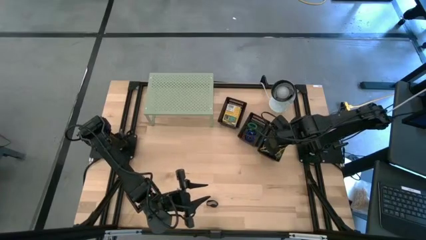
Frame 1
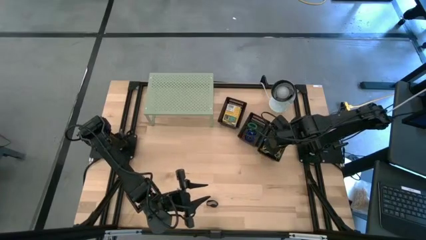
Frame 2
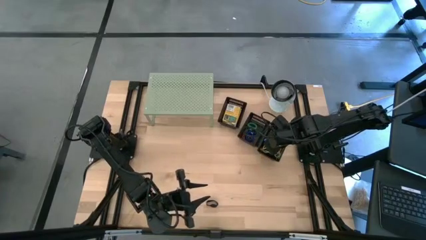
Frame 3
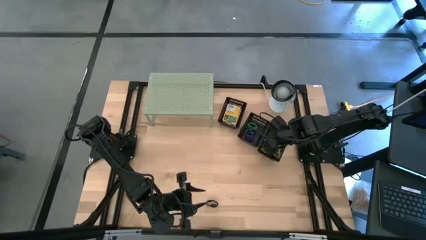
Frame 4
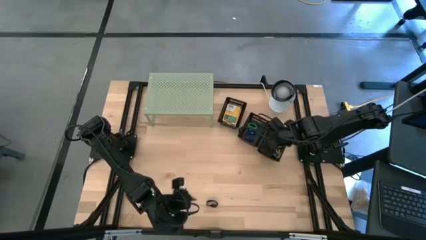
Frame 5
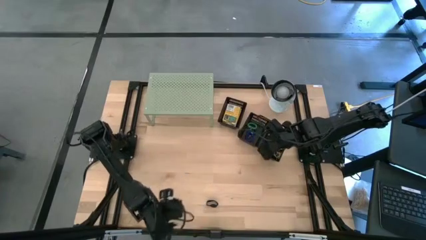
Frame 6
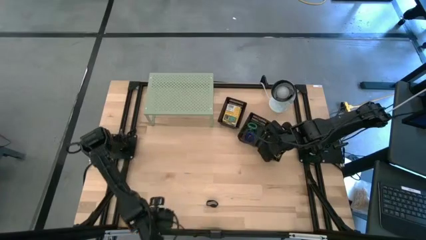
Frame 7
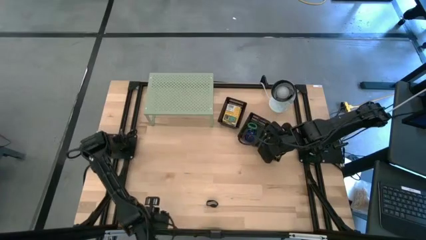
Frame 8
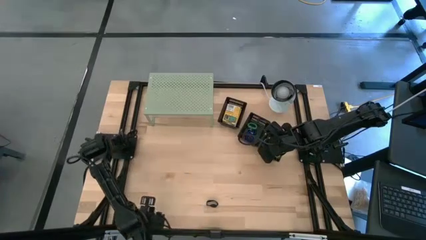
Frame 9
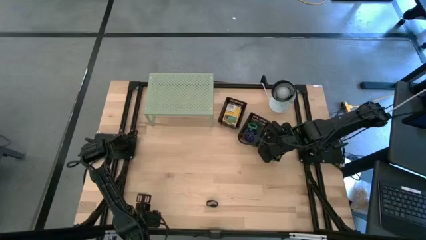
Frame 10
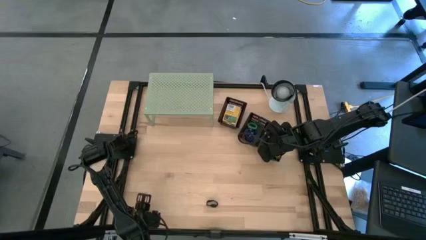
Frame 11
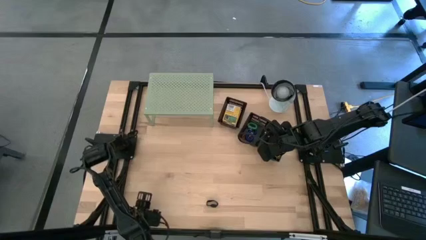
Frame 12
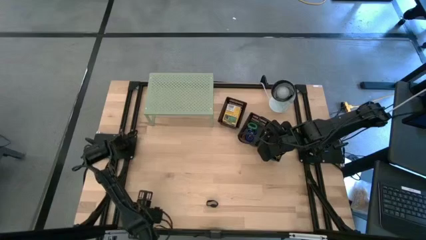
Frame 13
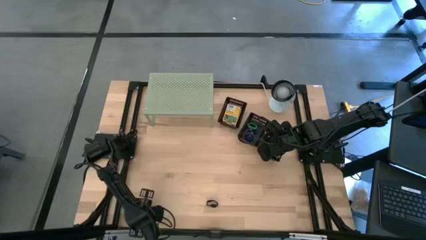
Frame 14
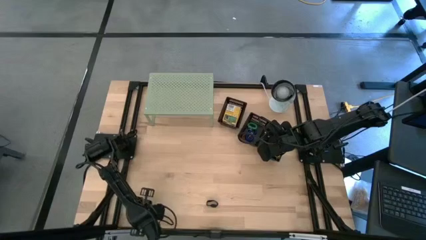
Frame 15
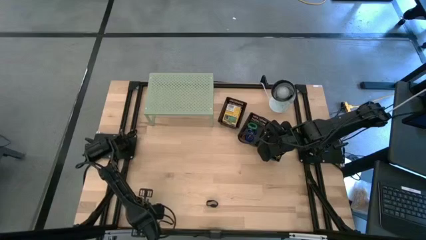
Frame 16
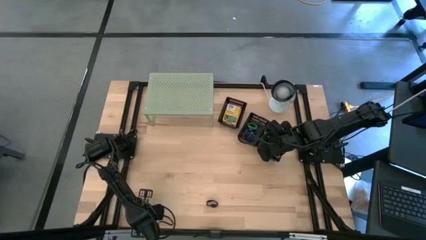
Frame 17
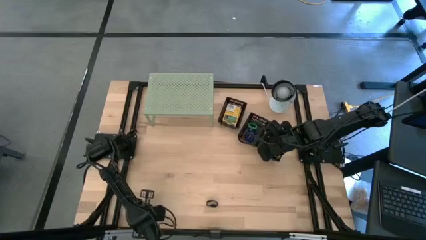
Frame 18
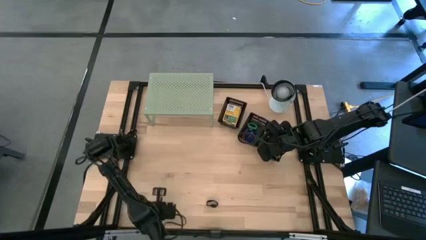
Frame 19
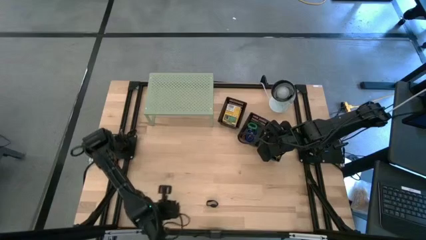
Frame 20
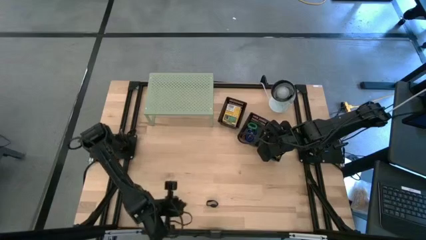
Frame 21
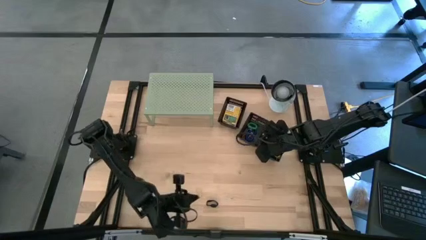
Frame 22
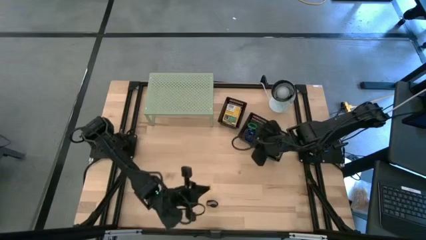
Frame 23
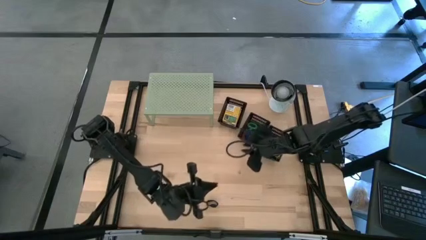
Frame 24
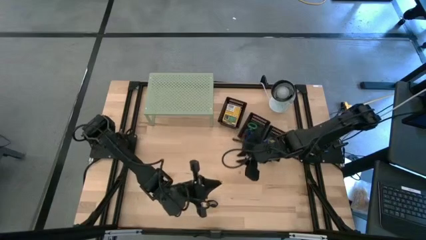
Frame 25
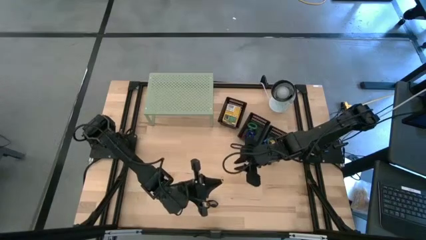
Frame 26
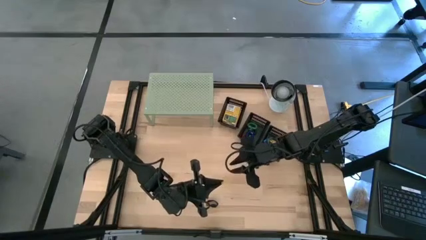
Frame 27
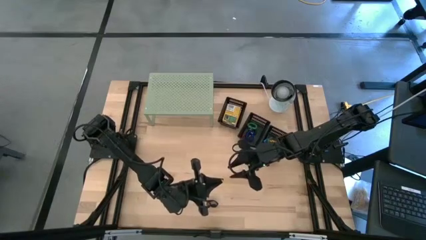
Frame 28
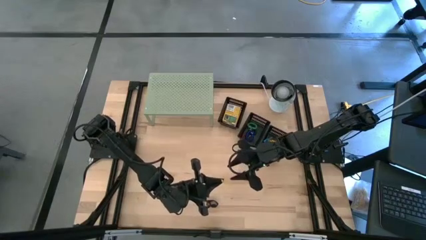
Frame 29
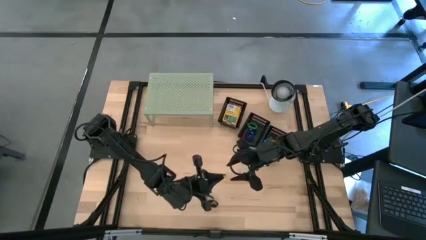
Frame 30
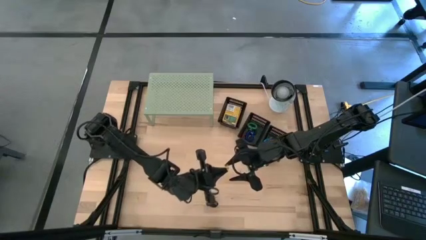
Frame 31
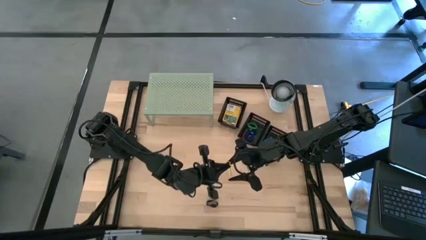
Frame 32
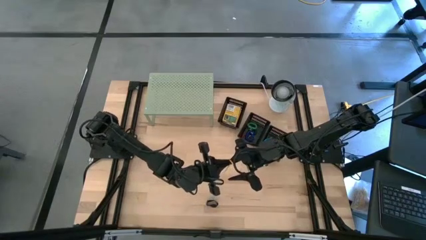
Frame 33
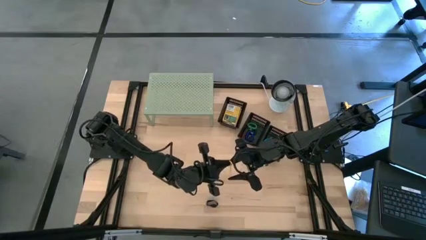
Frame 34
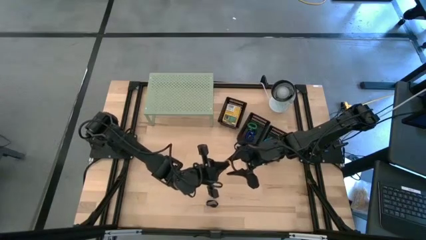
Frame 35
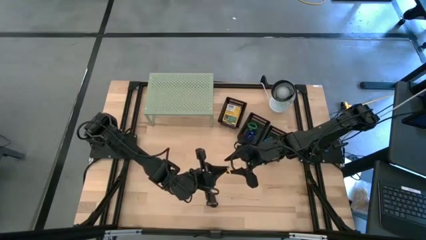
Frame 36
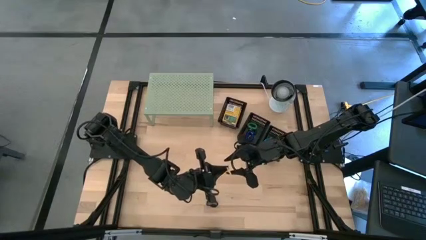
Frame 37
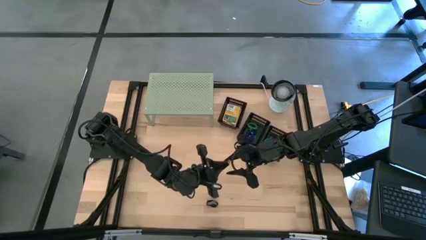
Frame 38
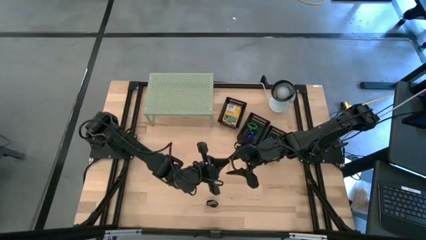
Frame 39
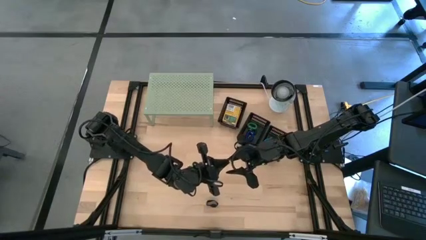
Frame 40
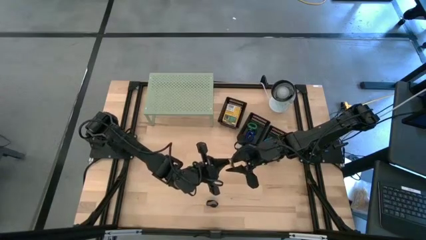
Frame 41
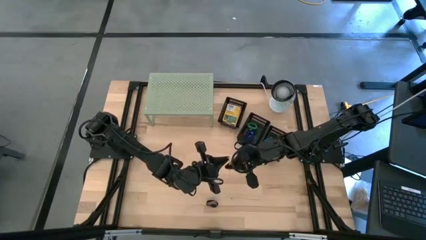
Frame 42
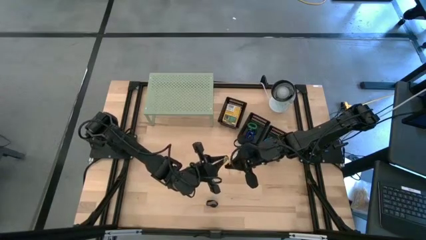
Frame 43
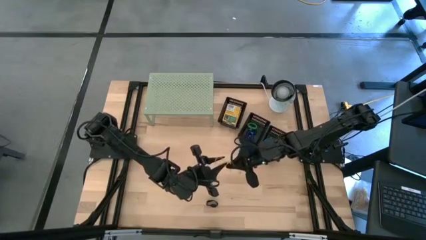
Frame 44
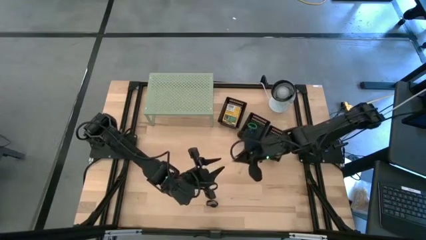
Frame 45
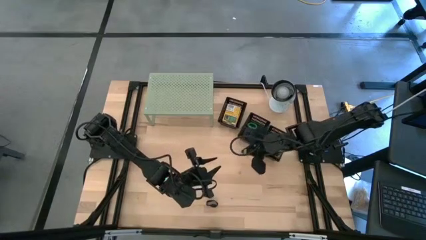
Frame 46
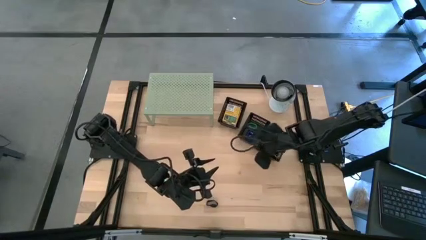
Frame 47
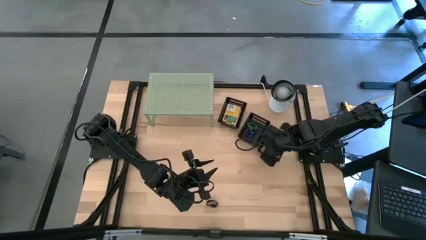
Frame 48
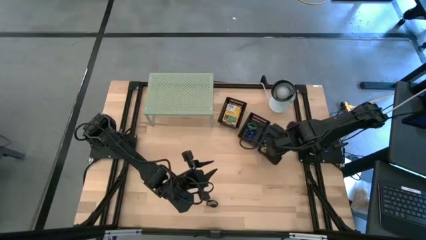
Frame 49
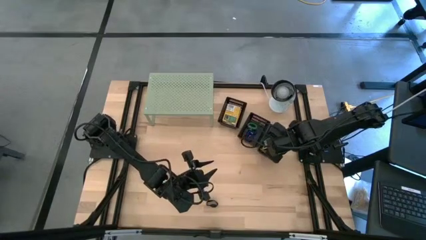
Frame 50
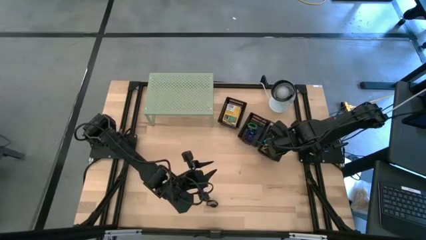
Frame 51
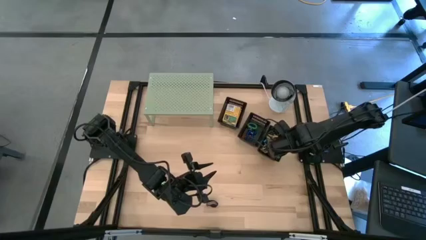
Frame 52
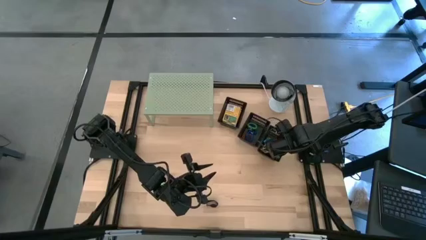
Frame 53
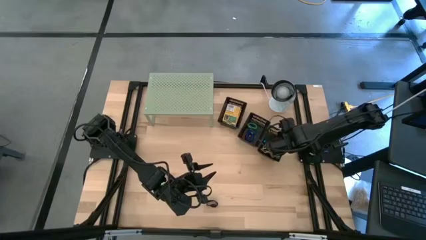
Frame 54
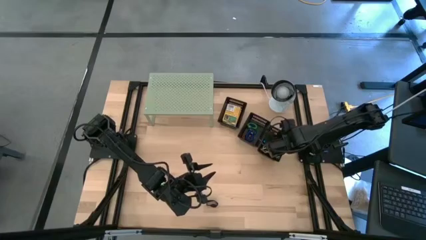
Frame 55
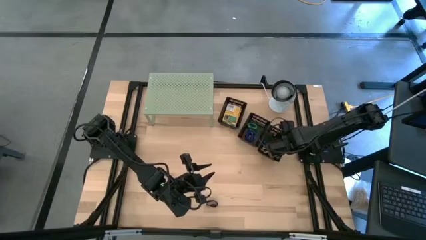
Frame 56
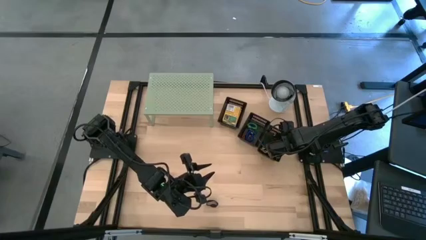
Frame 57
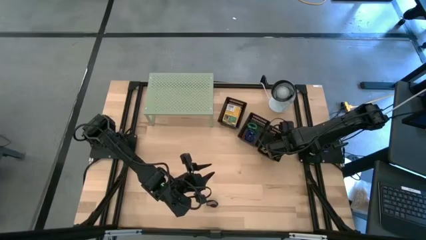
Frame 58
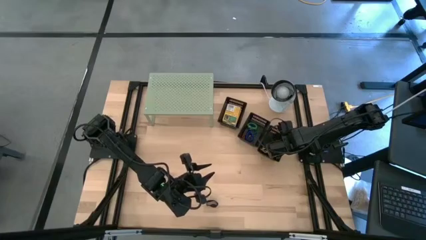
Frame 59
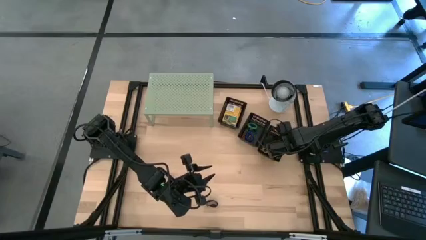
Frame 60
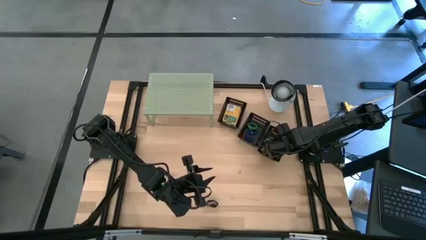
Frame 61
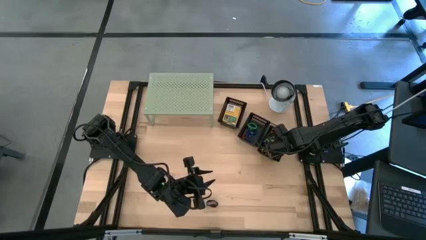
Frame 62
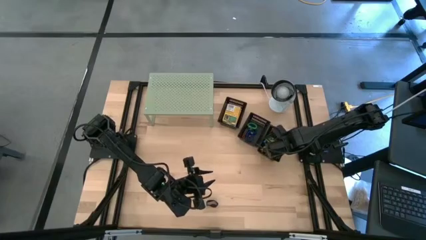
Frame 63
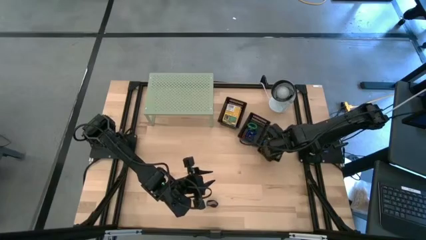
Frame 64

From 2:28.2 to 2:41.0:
Task: Pick & Place Office Desk Supplies
Put the yellow rubber band into the bottom black bin
